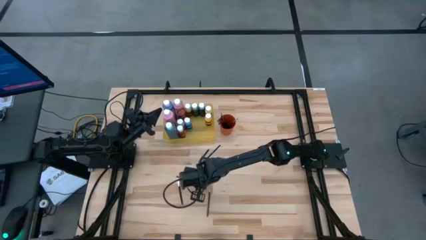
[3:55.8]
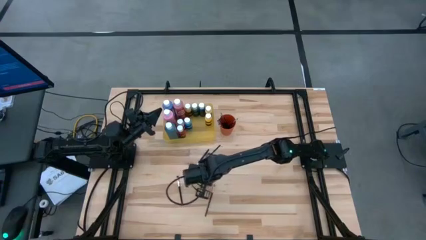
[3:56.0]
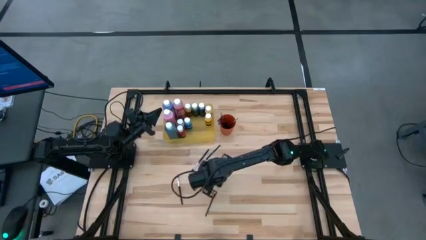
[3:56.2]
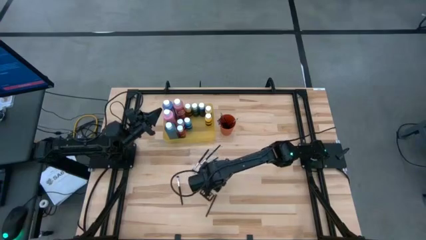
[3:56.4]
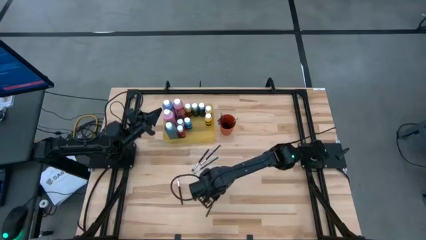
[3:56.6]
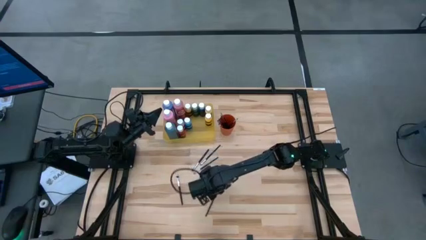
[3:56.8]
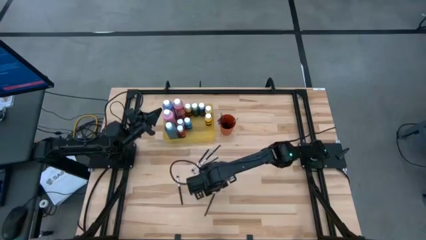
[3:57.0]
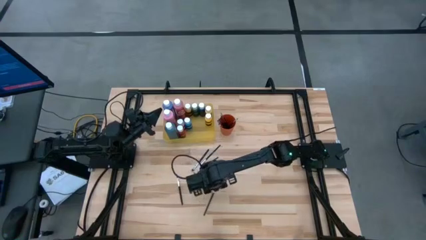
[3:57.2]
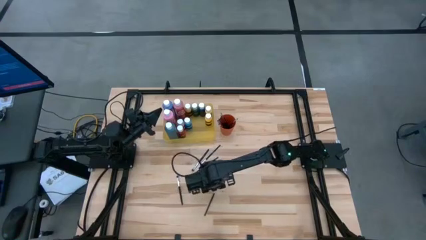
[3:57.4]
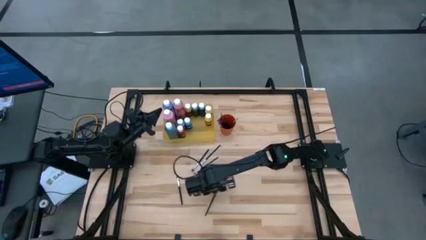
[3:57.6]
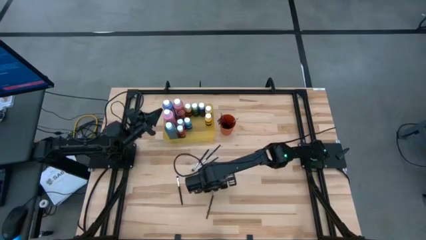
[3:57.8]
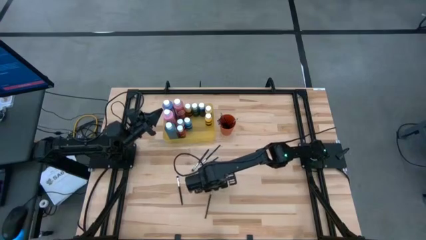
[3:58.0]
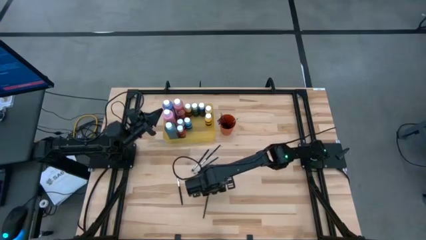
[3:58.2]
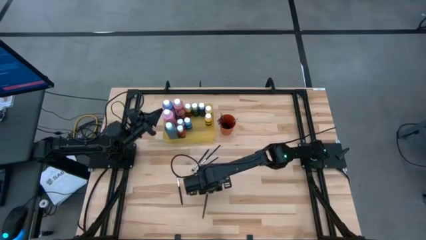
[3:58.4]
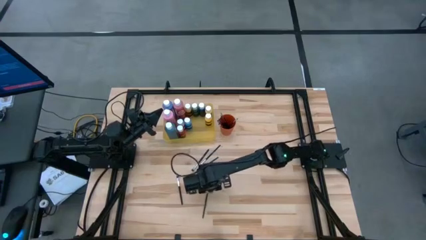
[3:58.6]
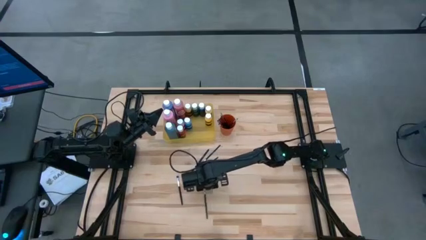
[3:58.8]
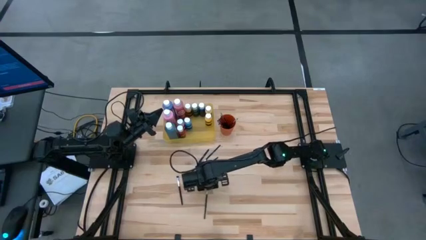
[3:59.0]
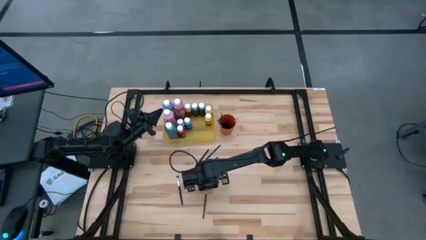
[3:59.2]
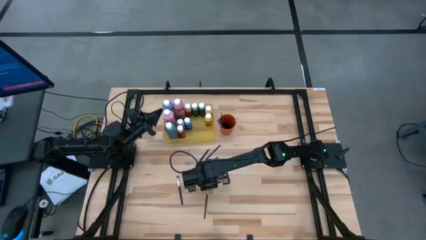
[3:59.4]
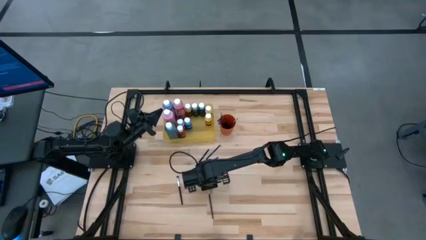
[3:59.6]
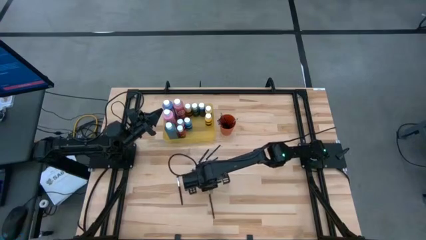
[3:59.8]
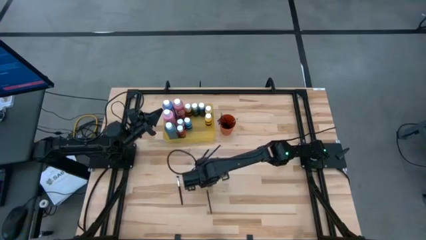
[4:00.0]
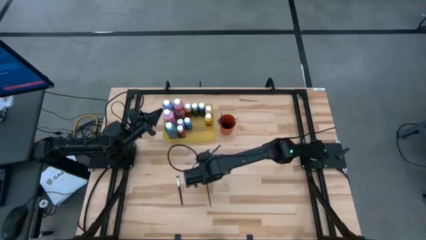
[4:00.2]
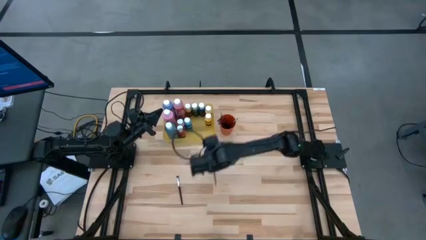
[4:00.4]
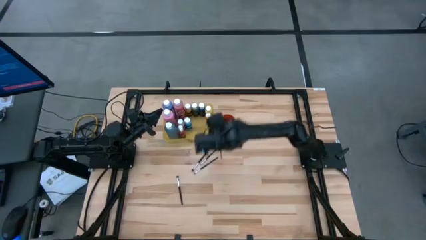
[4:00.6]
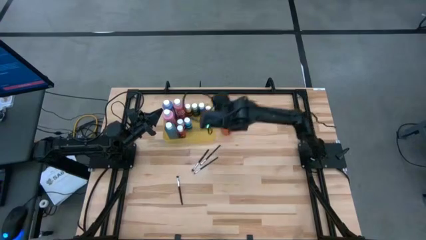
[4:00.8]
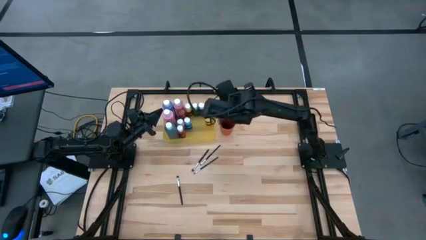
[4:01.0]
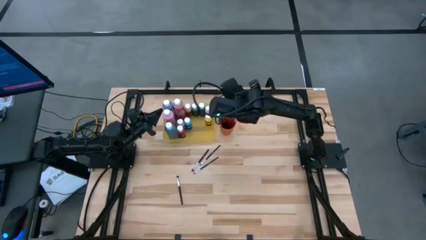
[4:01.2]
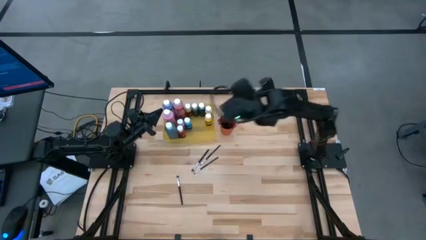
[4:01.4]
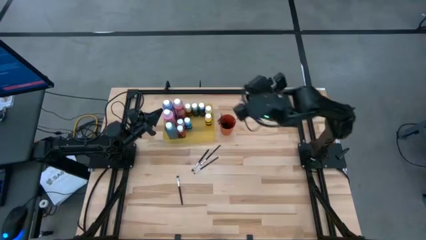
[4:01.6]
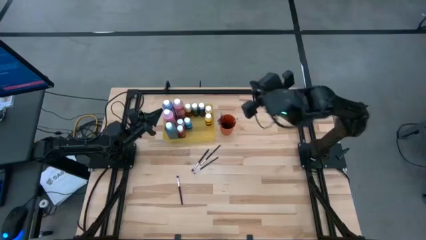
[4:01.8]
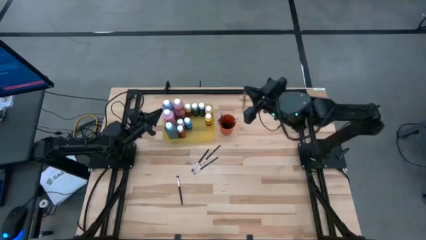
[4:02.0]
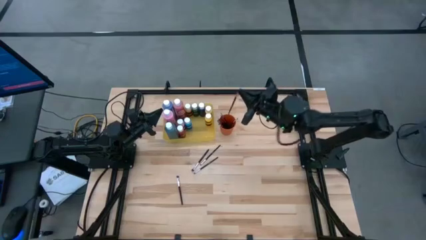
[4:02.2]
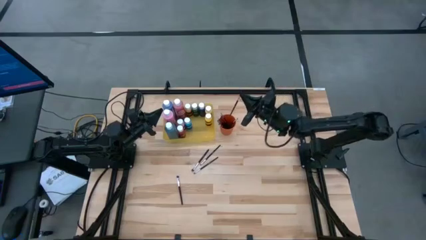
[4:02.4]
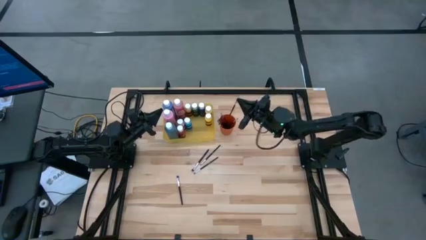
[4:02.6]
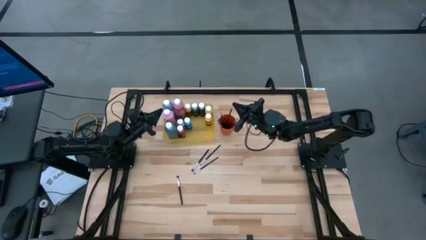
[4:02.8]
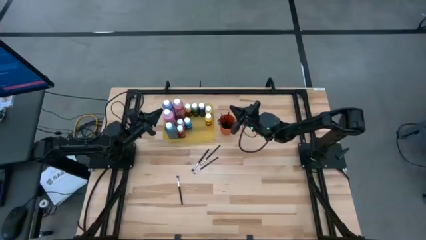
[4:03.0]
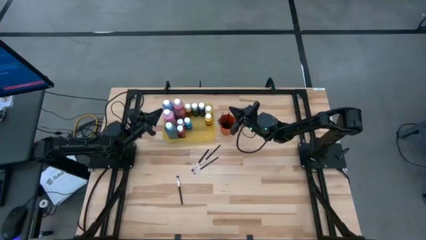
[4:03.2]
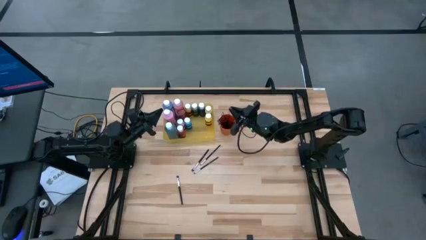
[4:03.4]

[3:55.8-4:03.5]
Task: Pick & Place Paint Supplies
Put the silver paint brush into the orange cup

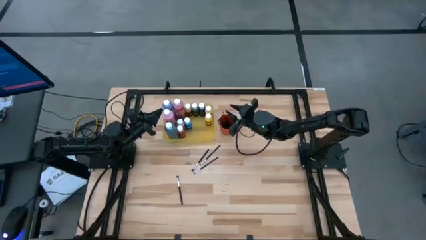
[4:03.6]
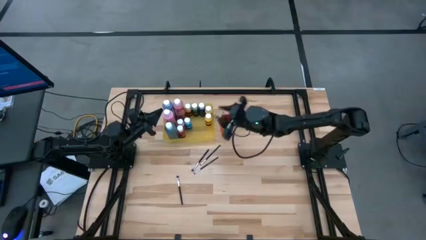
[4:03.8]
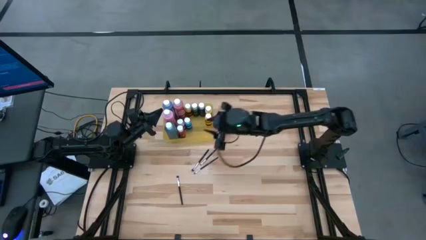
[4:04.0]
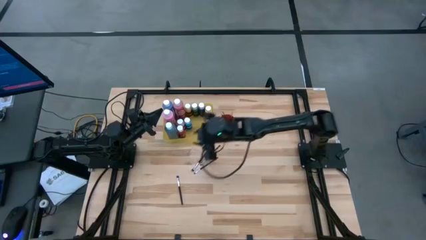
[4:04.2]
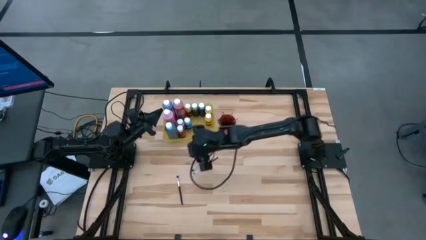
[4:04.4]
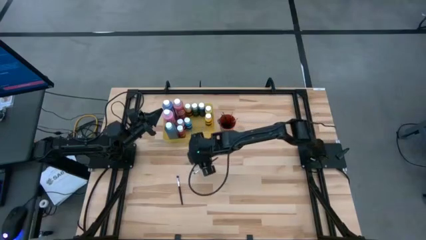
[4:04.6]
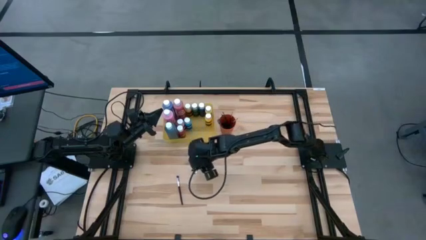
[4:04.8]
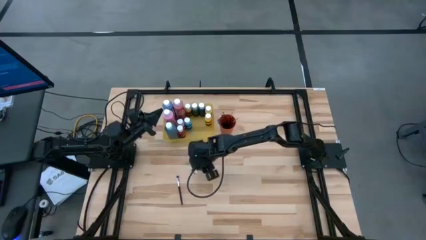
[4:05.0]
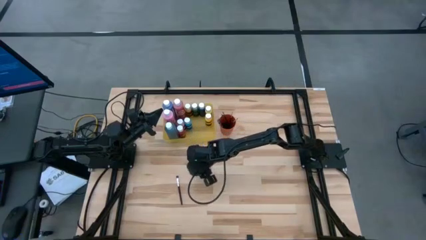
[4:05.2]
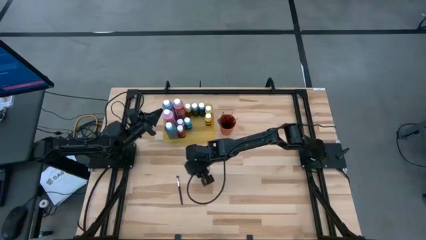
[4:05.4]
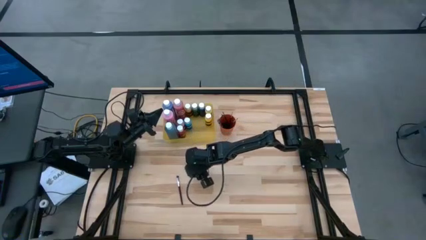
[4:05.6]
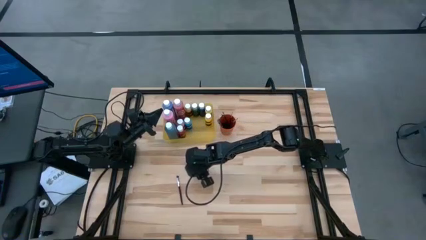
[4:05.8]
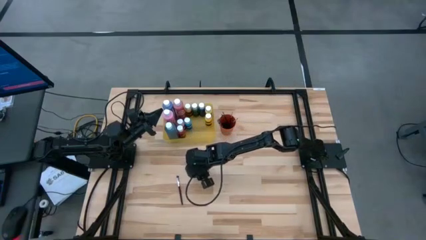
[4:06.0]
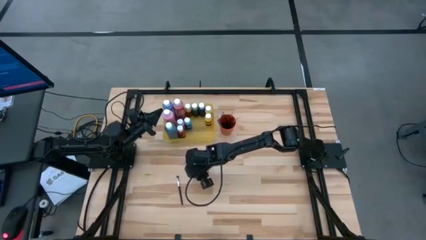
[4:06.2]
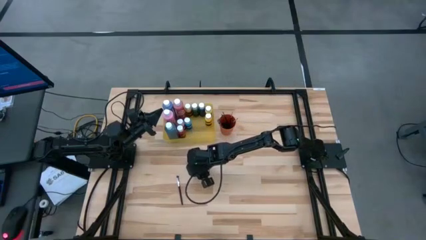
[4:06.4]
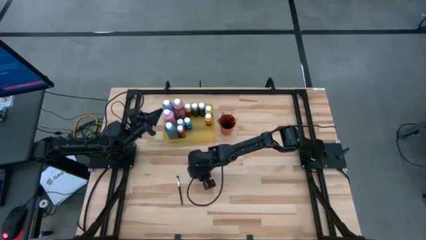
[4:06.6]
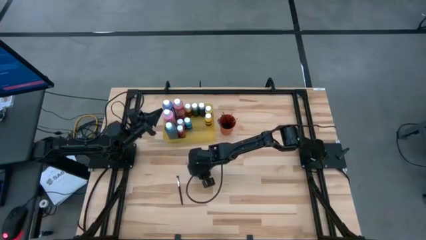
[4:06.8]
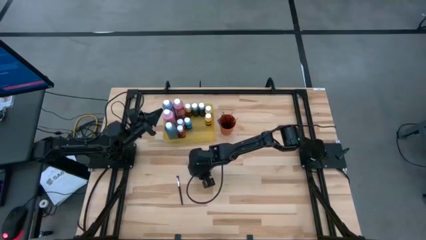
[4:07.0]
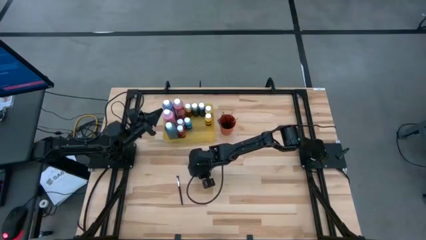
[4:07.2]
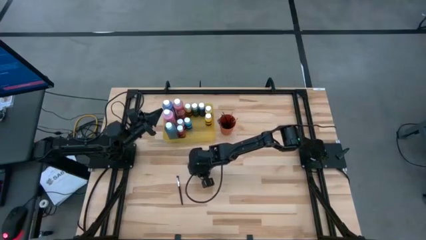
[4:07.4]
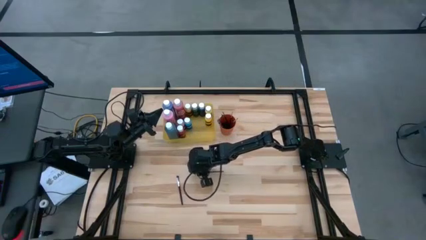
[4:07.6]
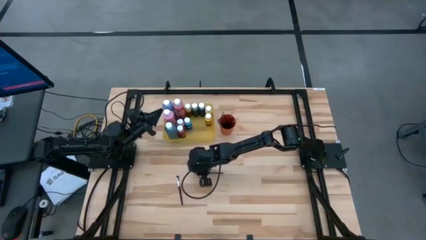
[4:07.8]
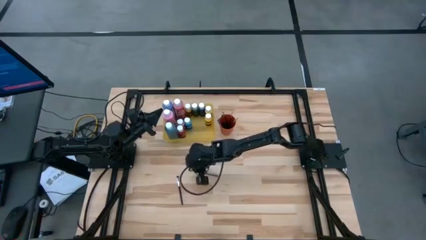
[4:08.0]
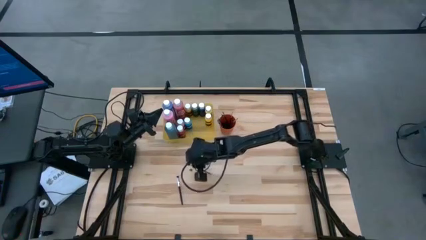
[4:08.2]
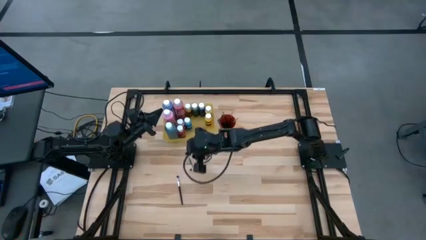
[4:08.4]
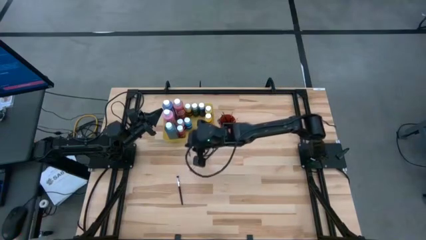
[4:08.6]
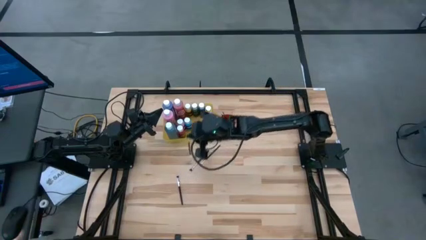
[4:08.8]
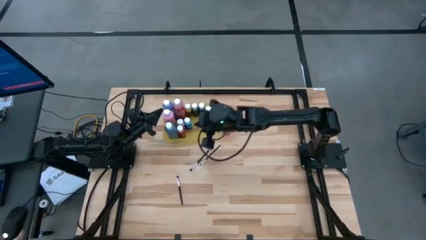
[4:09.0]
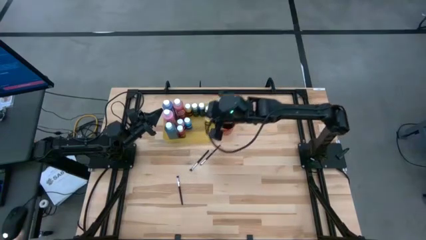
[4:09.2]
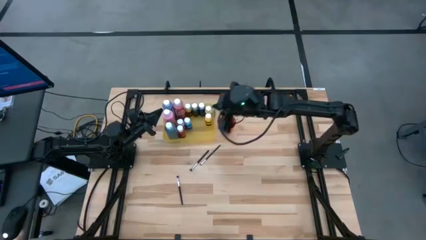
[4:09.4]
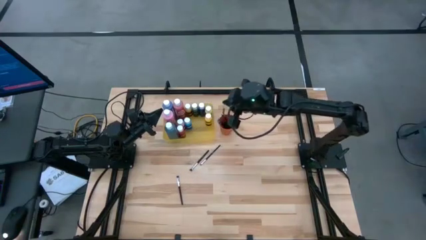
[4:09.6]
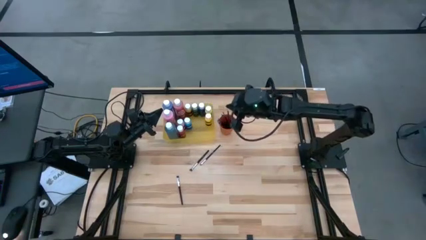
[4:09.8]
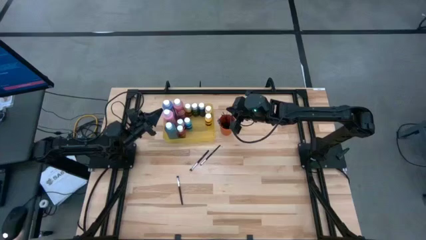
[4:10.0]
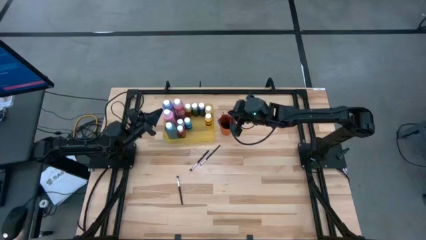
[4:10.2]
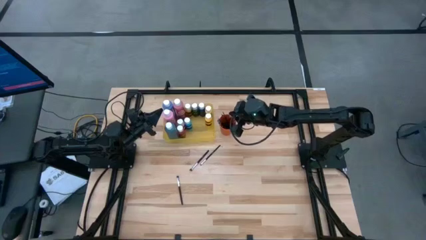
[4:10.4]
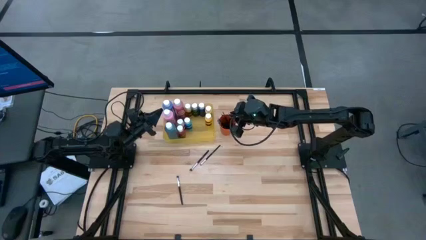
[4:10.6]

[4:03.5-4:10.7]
Put the silver paint brush into the orange cup
